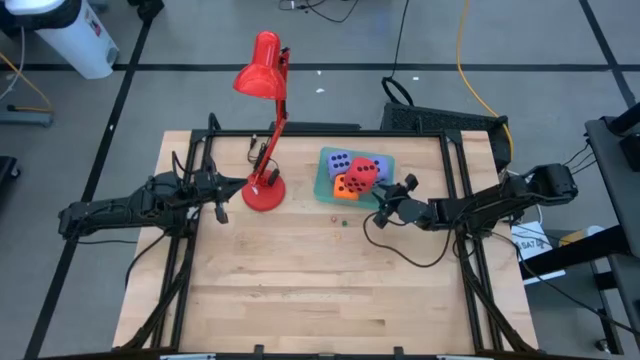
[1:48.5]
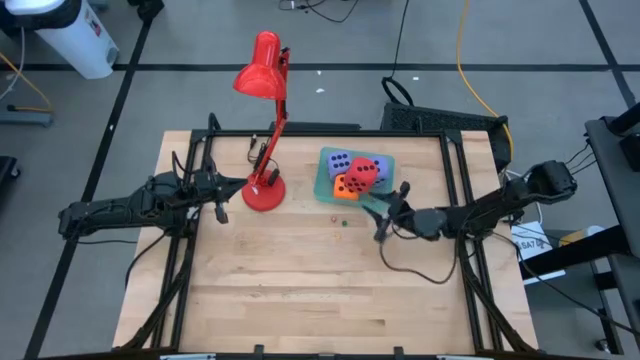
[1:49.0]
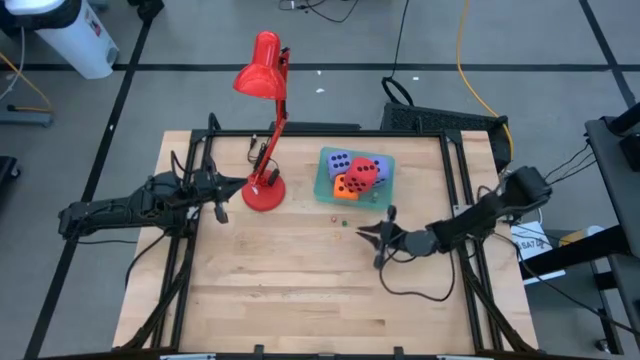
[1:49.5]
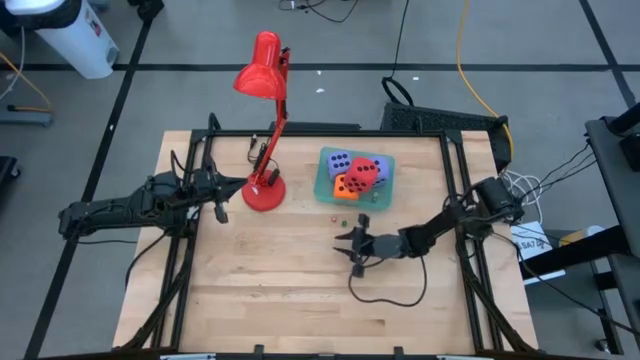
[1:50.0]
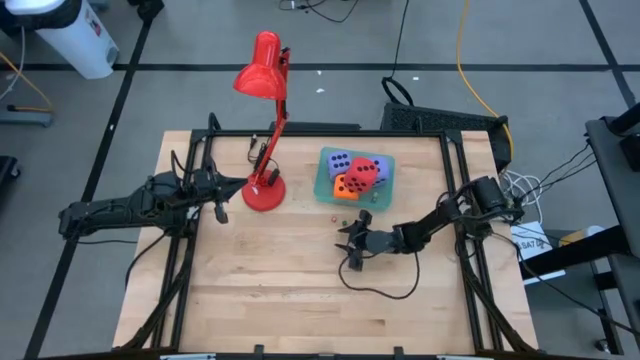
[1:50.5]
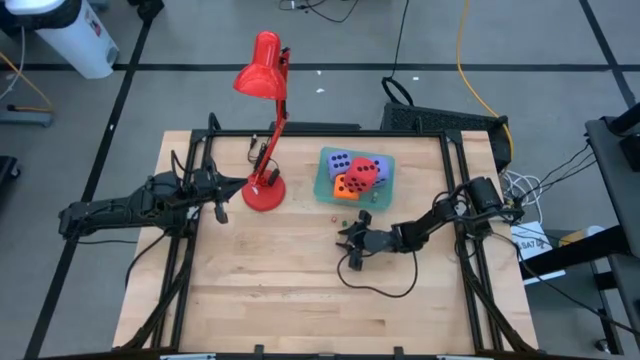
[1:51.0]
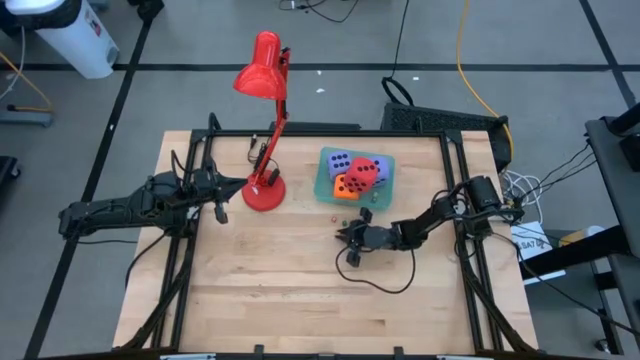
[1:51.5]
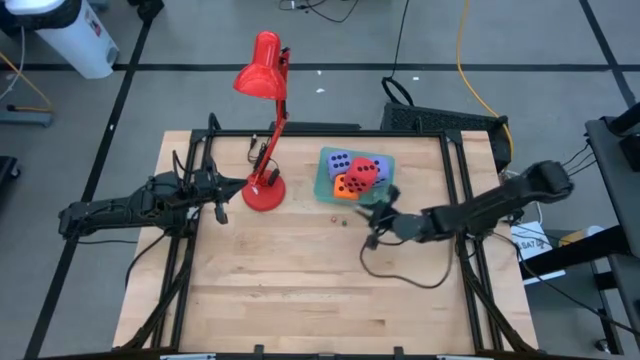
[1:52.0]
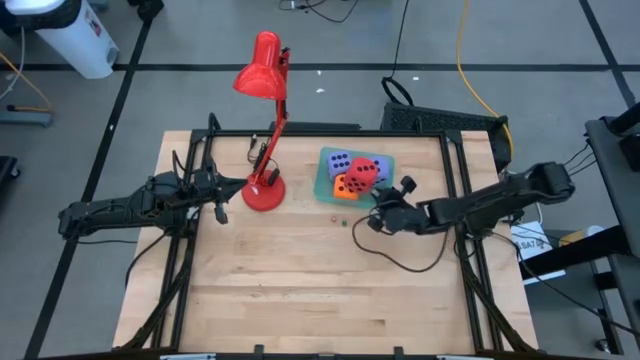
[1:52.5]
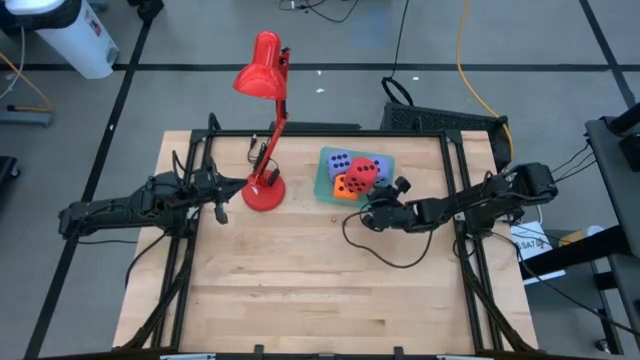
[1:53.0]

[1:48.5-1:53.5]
Task: Pick & Place Dice
Put the small yellow dice into the green bin

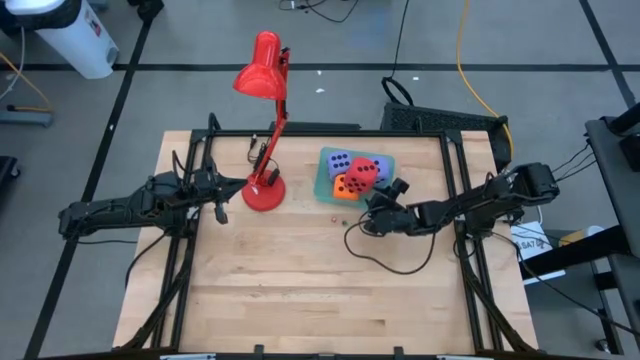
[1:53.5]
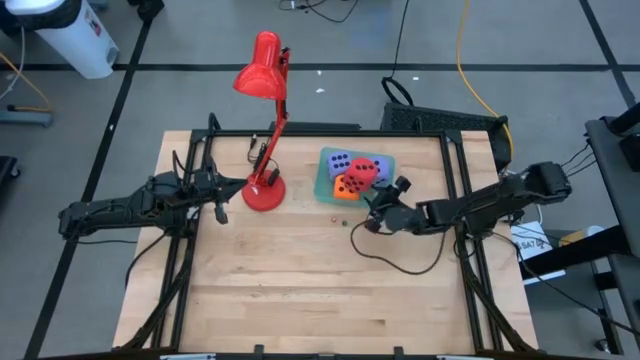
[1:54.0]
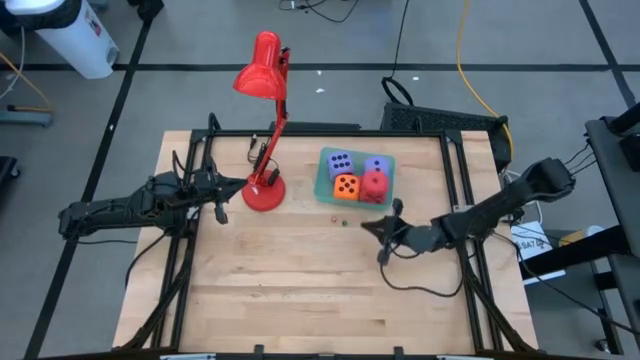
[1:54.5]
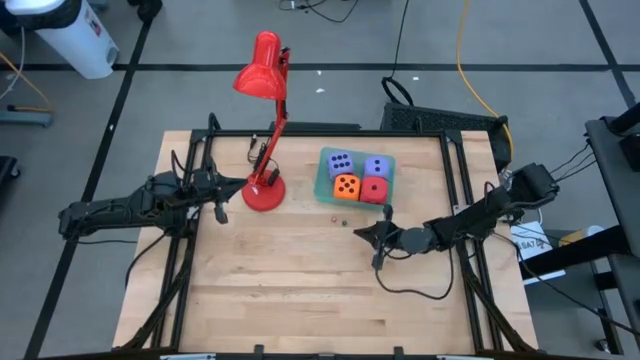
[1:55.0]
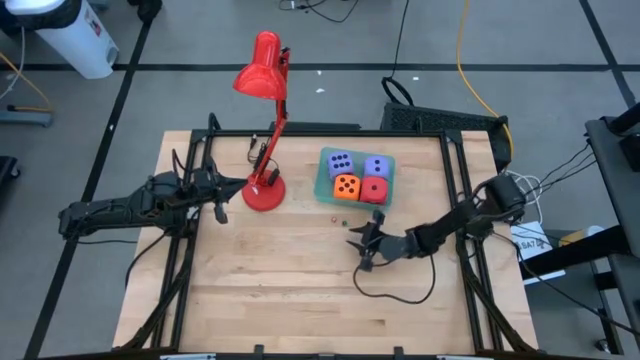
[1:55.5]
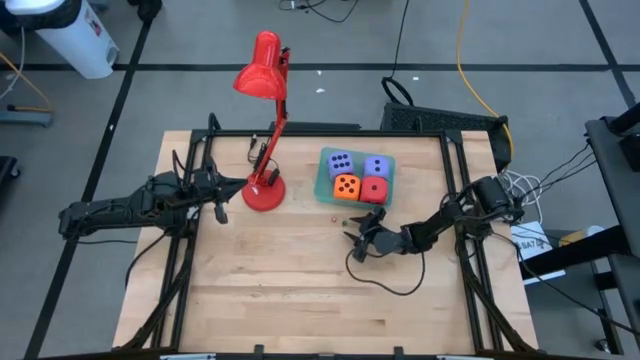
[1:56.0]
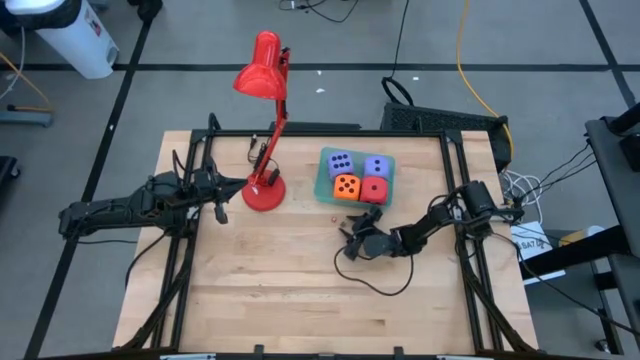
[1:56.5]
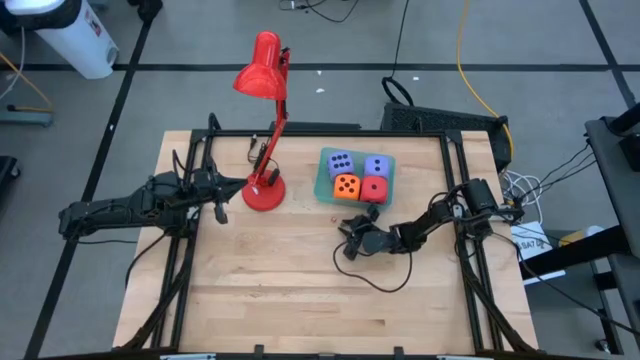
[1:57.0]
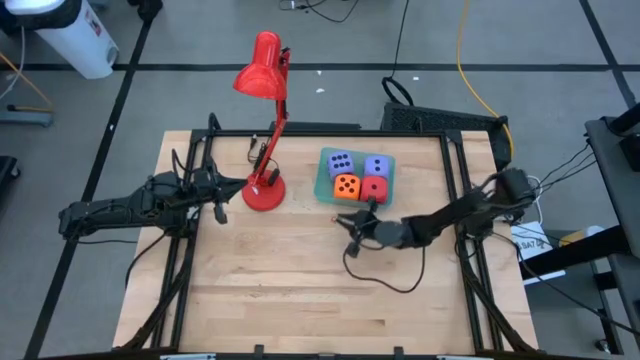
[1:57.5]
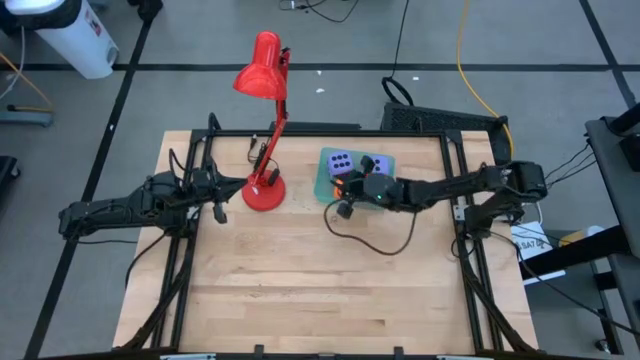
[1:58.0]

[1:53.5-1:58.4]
Put the small green dice into the green bin

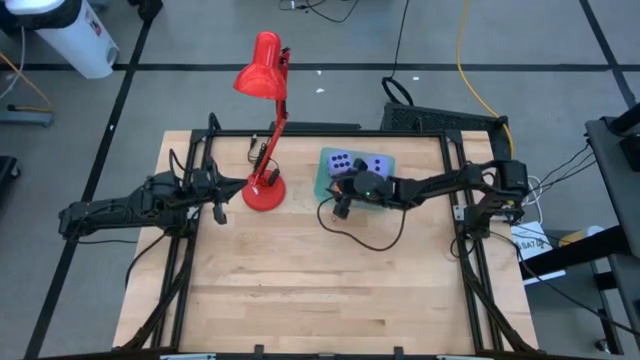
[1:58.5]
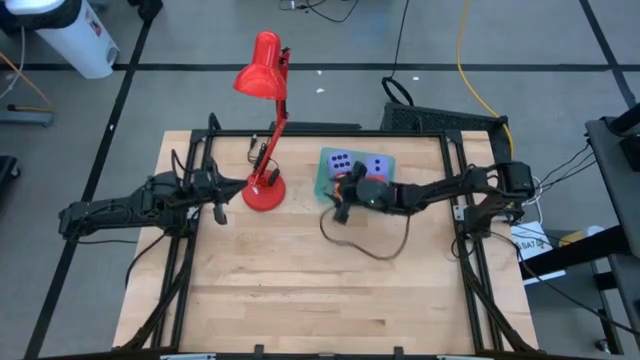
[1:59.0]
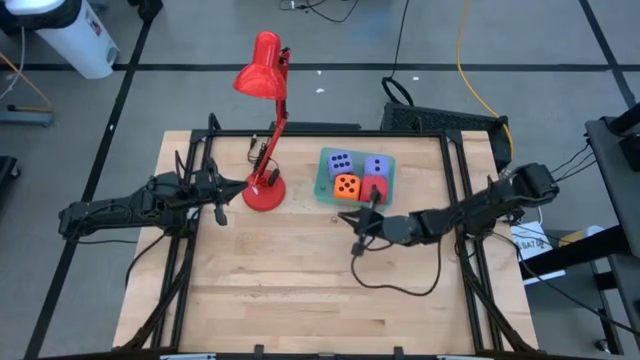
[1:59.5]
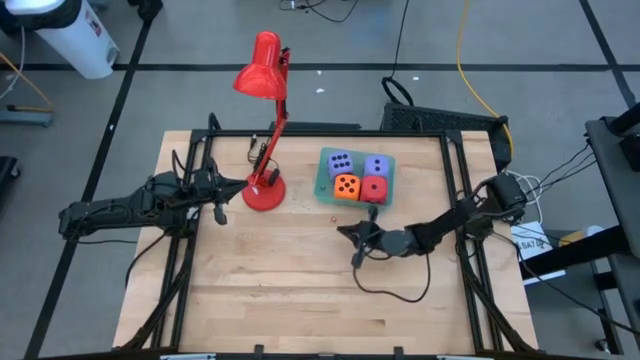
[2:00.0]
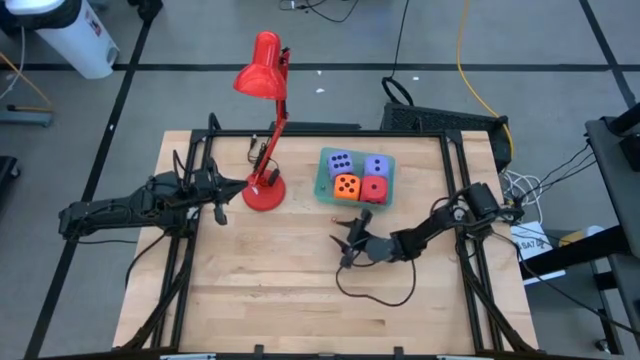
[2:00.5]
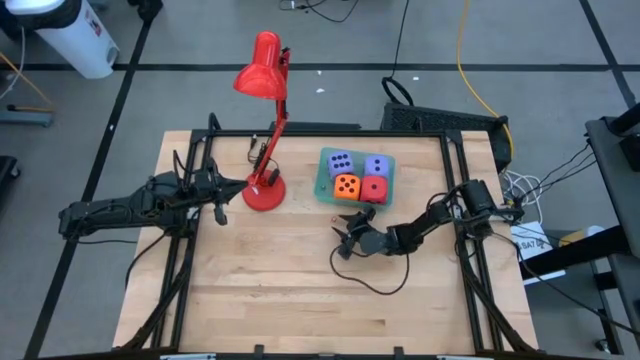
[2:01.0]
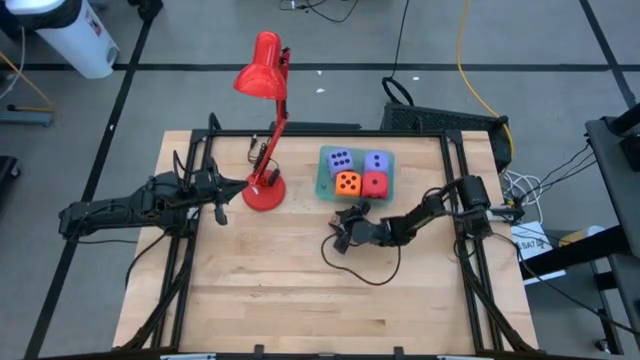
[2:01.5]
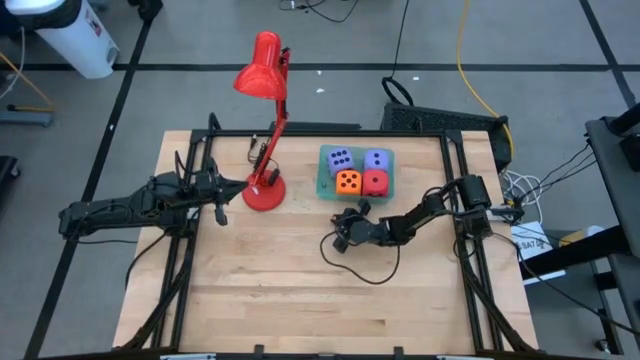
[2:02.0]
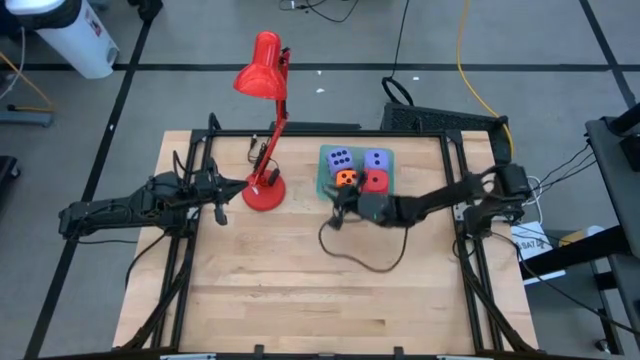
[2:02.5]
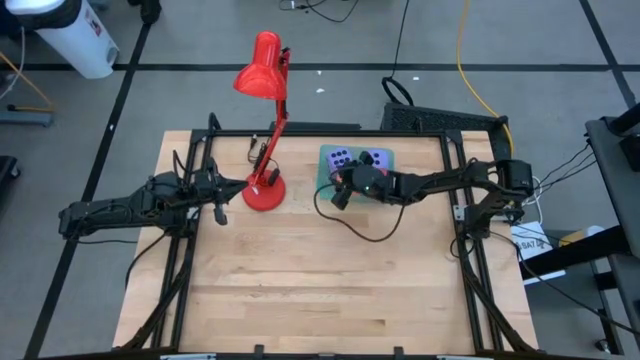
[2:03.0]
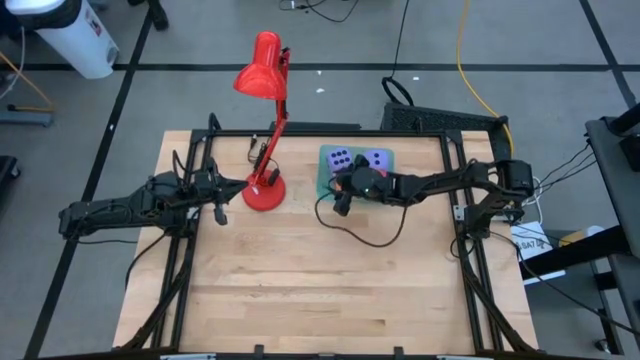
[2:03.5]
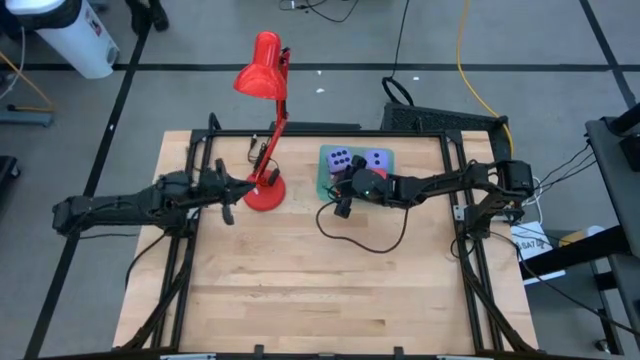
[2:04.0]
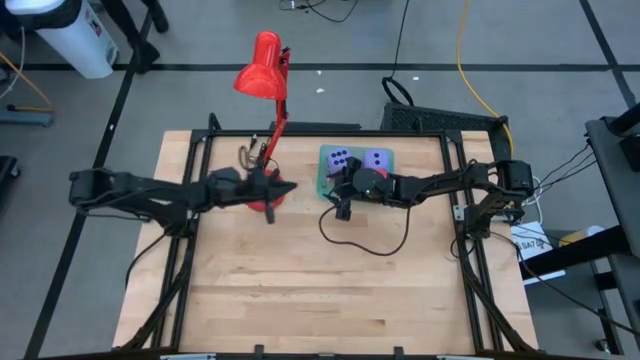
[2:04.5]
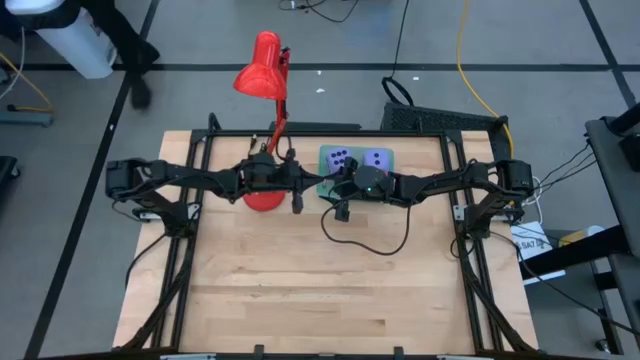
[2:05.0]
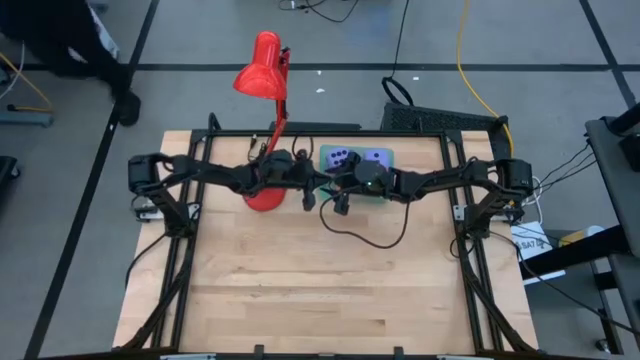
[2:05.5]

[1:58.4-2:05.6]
Put the small red dice into the green bin

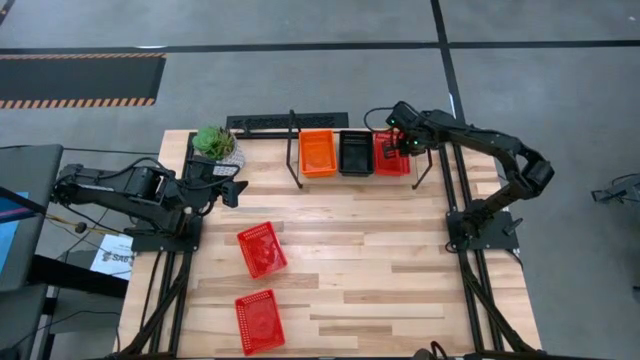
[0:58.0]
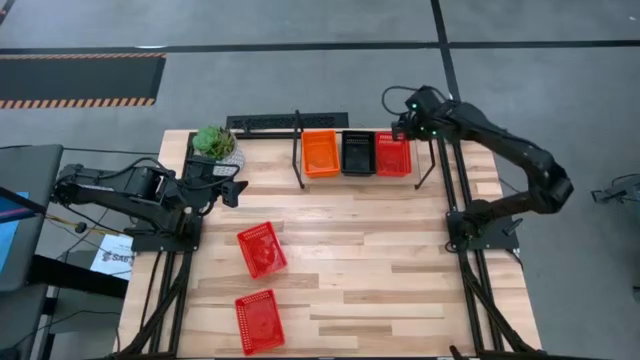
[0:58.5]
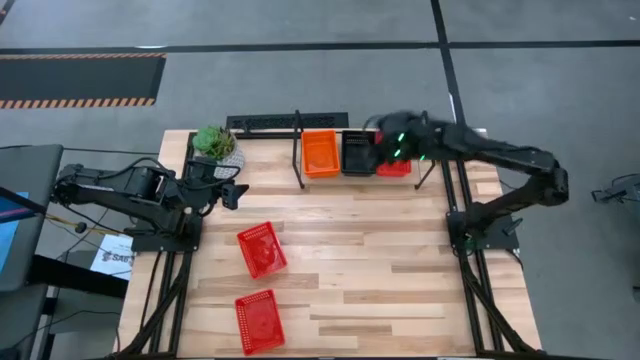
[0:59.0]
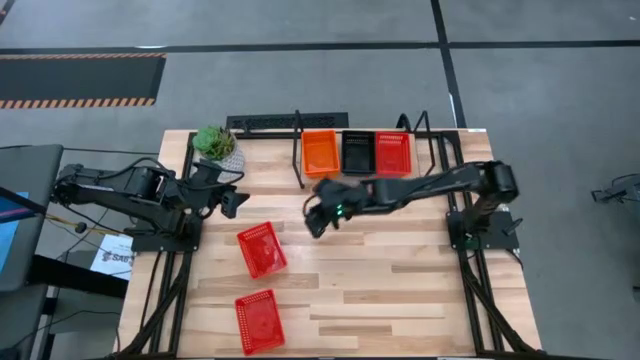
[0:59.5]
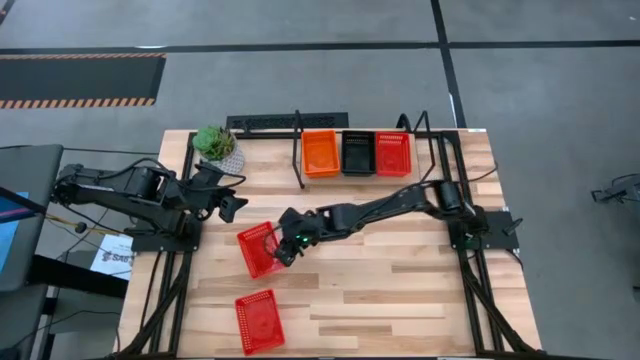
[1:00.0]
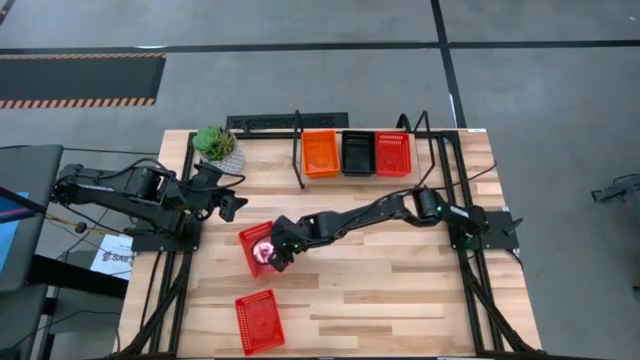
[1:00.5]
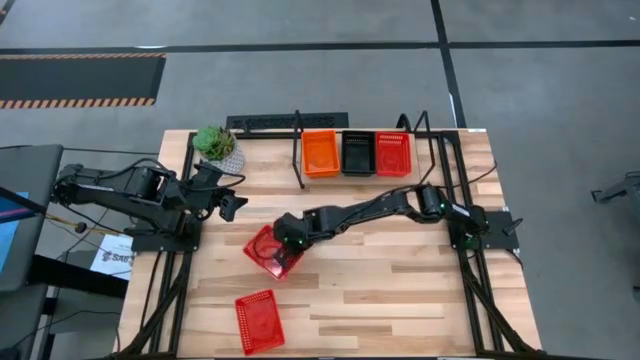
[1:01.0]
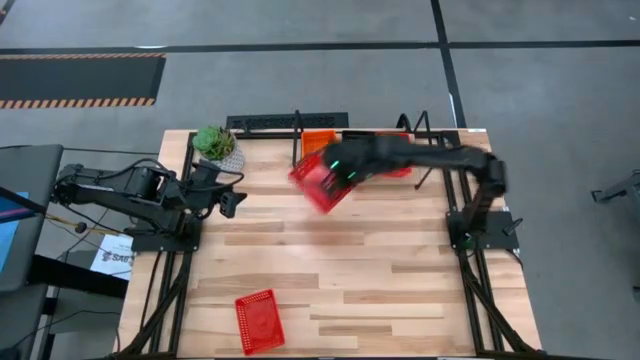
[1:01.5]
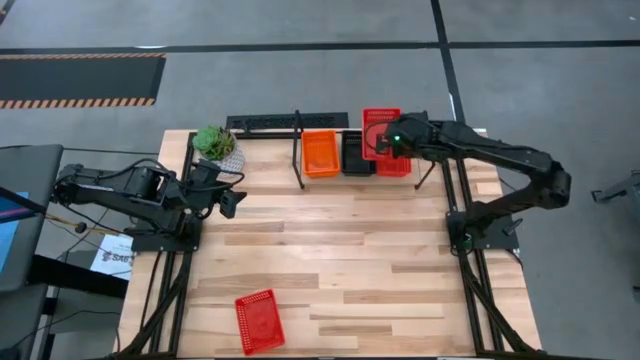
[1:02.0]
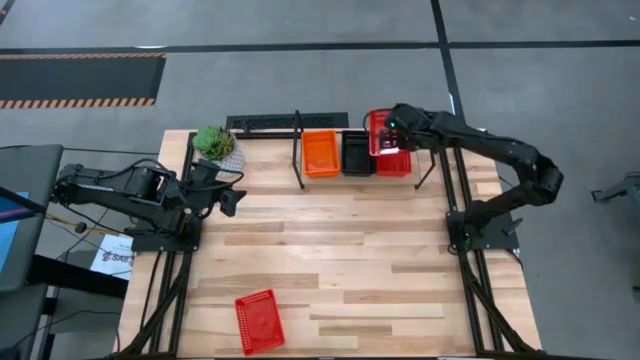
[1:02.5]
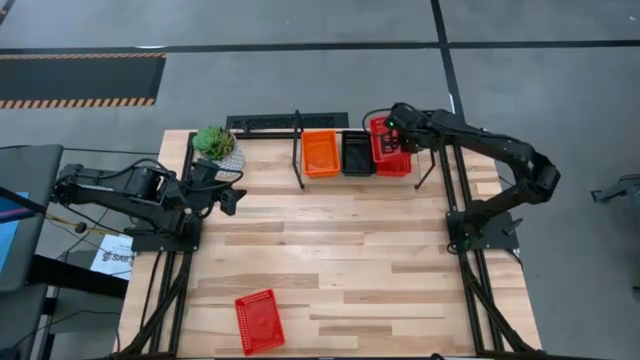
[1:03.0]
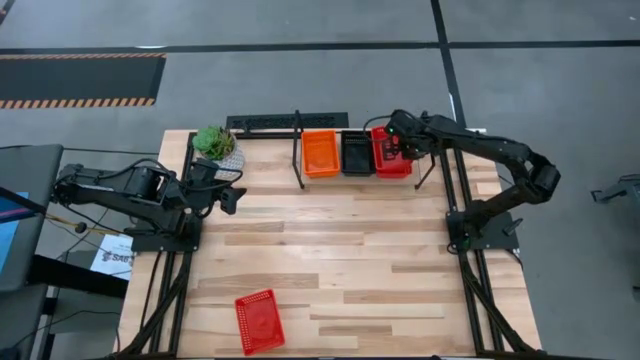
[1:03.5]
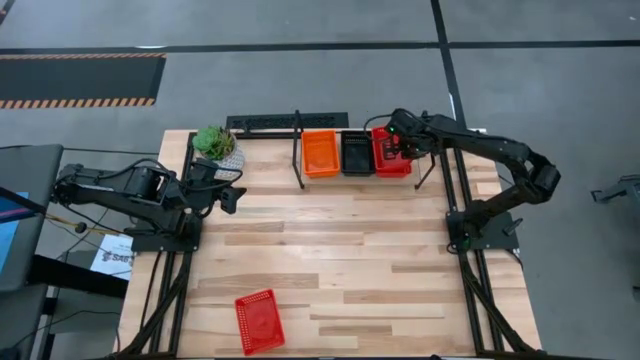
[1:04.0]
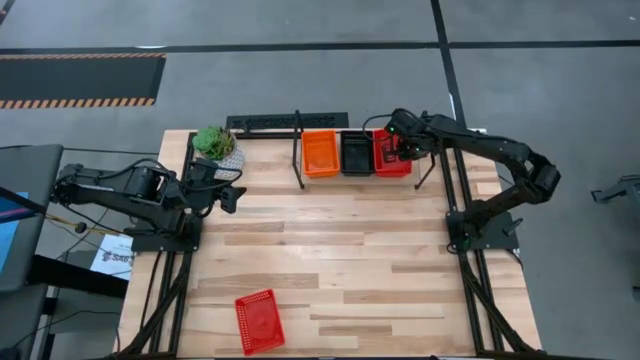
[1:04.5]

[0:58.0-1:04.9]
Task: Stack baskets on shelf by color
Stack the top red bin on top of the other red bin on the shelf
